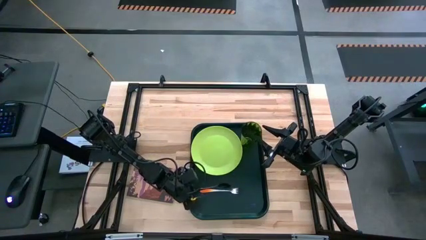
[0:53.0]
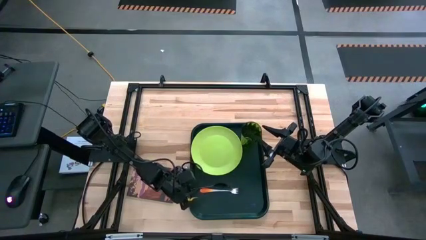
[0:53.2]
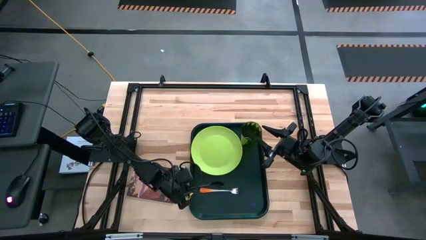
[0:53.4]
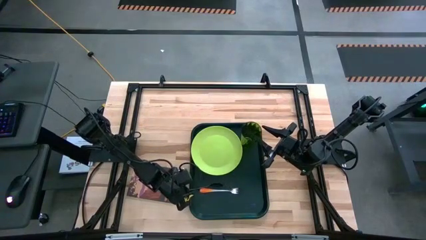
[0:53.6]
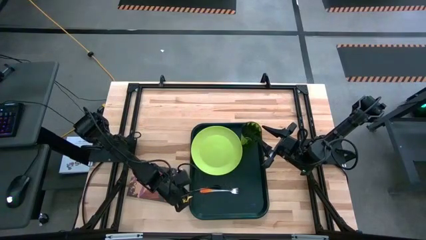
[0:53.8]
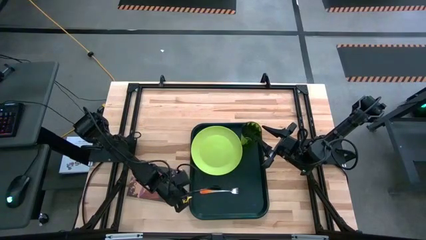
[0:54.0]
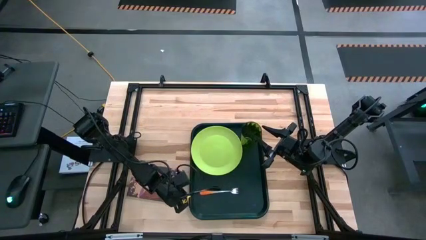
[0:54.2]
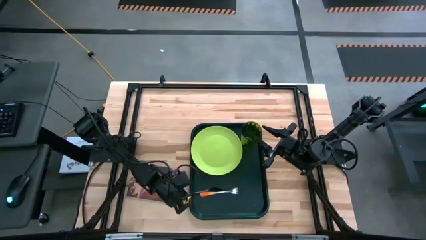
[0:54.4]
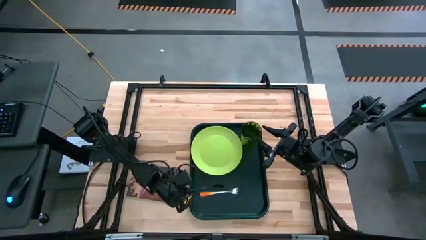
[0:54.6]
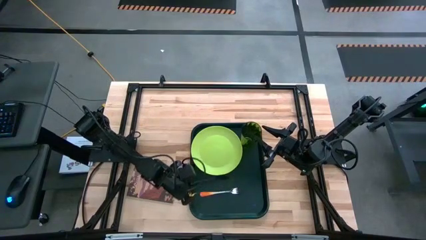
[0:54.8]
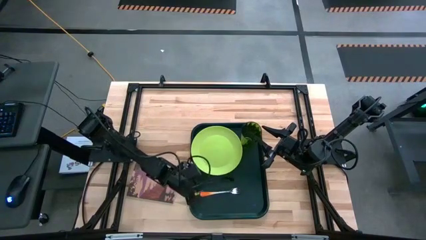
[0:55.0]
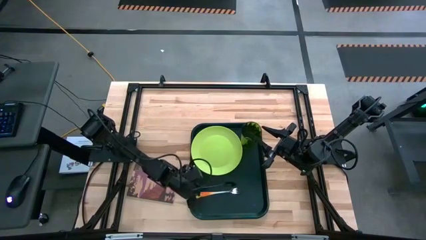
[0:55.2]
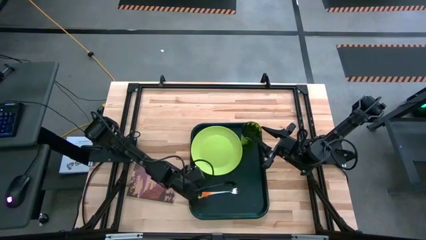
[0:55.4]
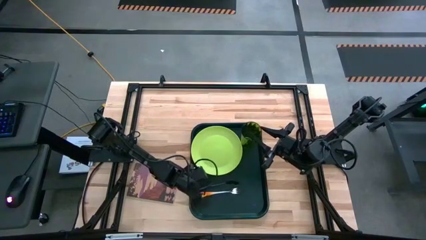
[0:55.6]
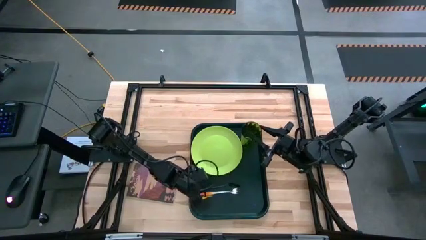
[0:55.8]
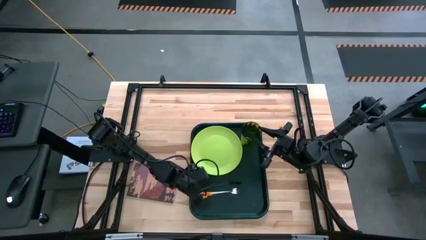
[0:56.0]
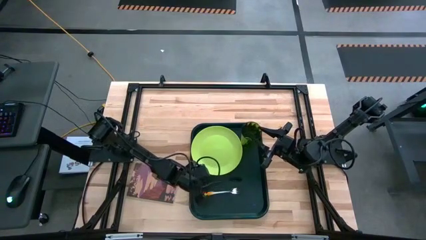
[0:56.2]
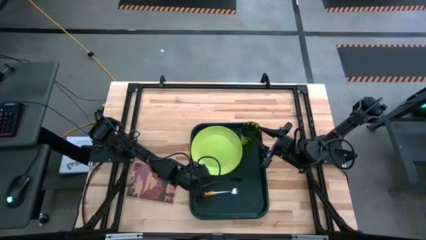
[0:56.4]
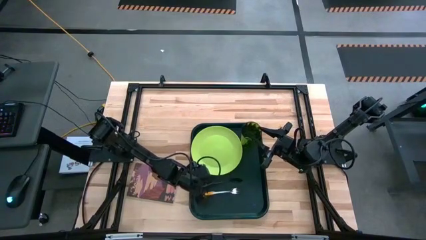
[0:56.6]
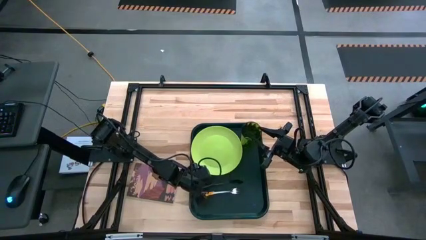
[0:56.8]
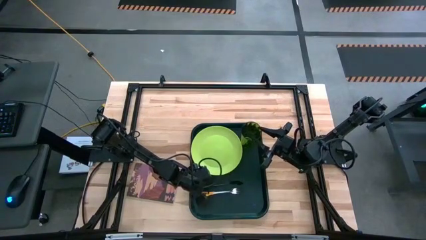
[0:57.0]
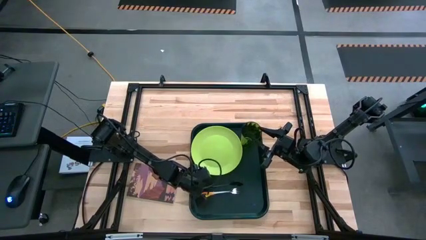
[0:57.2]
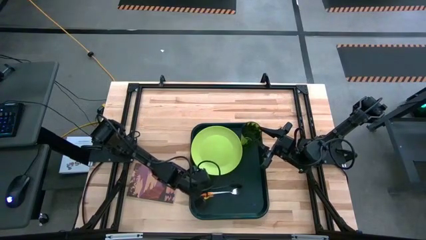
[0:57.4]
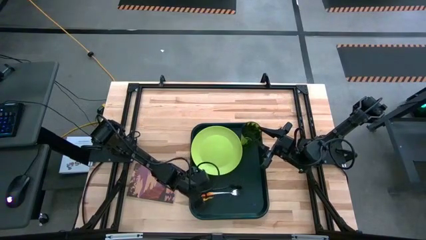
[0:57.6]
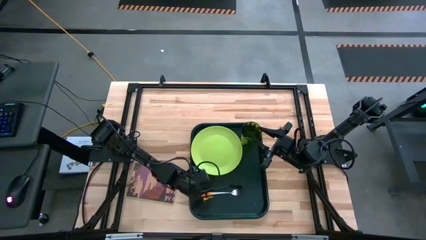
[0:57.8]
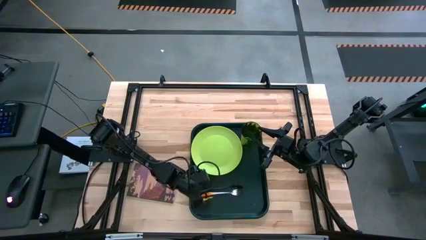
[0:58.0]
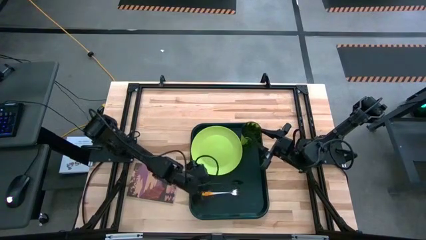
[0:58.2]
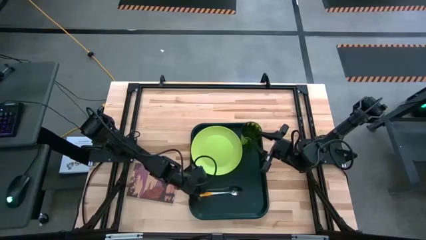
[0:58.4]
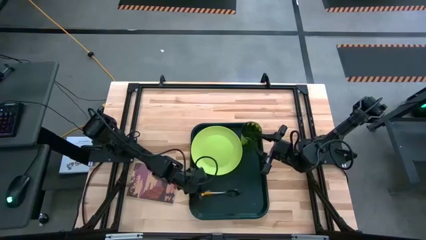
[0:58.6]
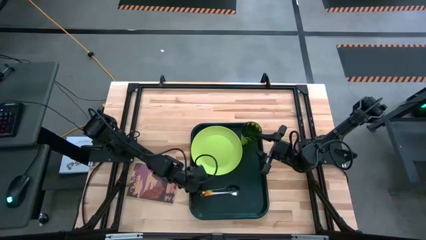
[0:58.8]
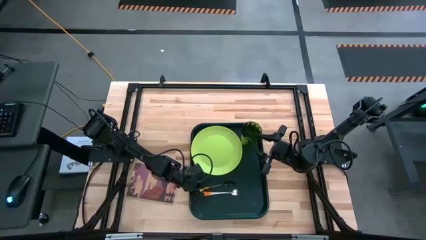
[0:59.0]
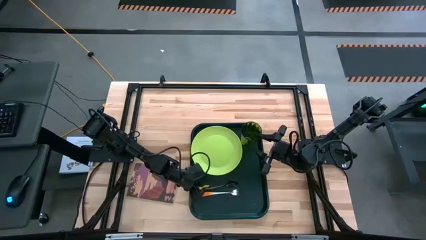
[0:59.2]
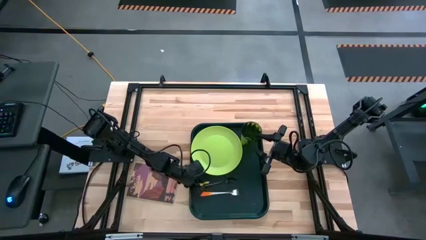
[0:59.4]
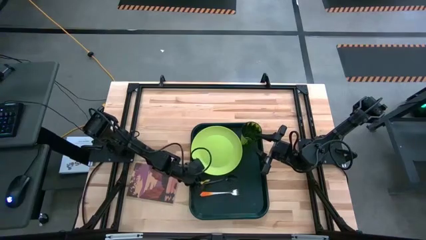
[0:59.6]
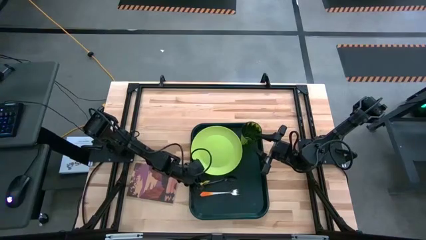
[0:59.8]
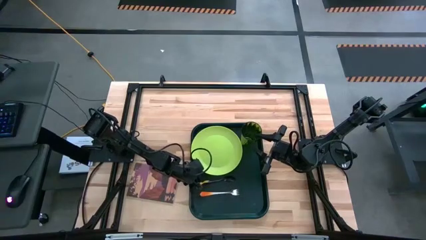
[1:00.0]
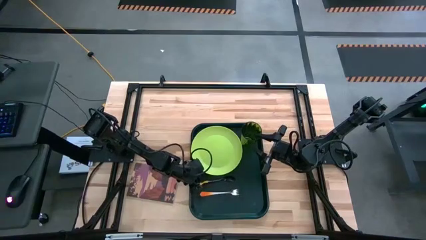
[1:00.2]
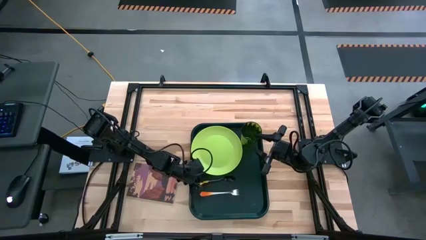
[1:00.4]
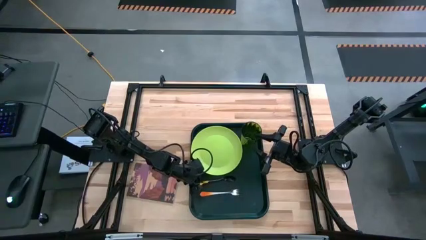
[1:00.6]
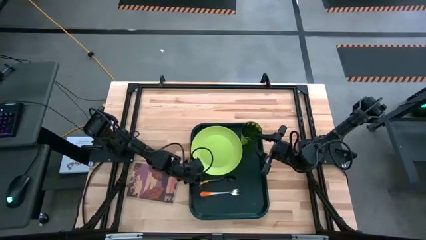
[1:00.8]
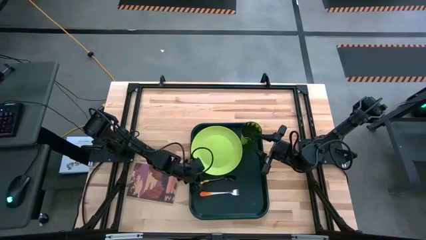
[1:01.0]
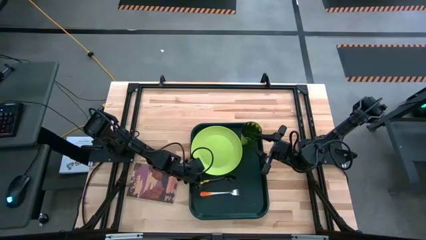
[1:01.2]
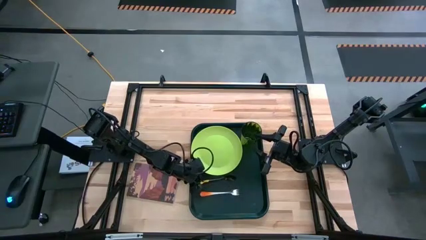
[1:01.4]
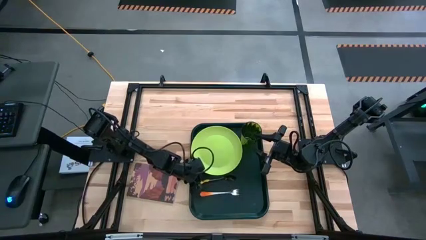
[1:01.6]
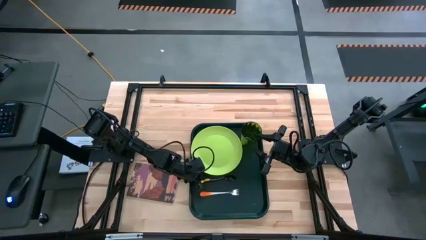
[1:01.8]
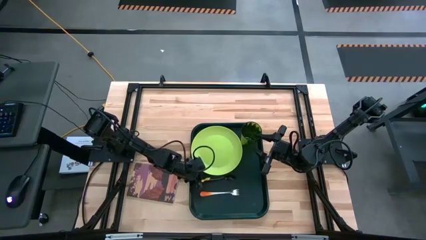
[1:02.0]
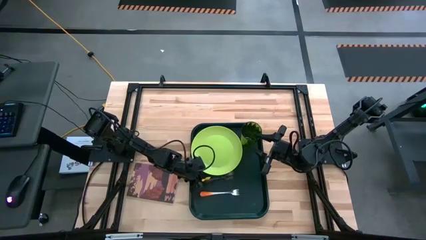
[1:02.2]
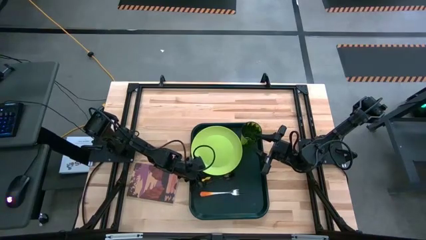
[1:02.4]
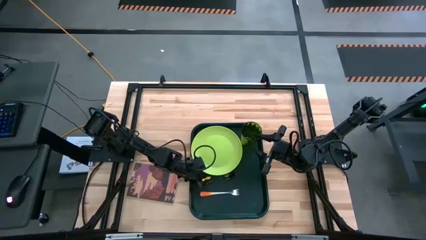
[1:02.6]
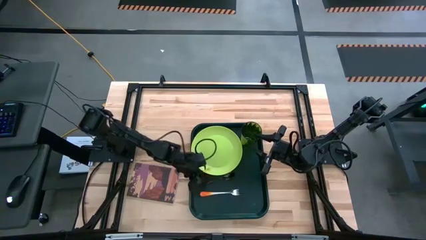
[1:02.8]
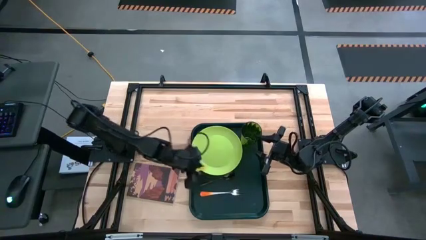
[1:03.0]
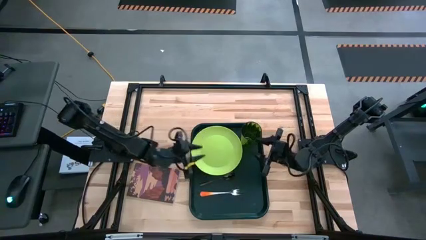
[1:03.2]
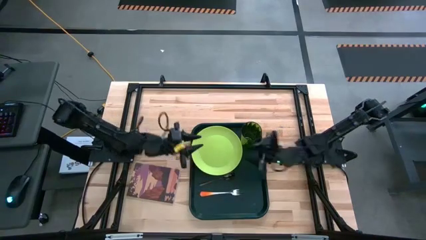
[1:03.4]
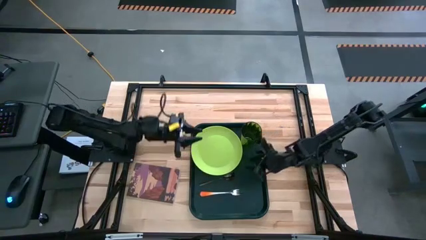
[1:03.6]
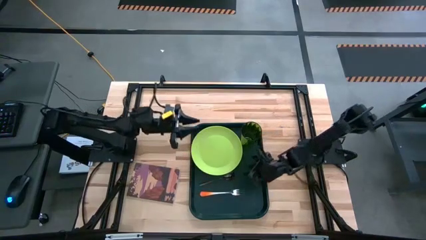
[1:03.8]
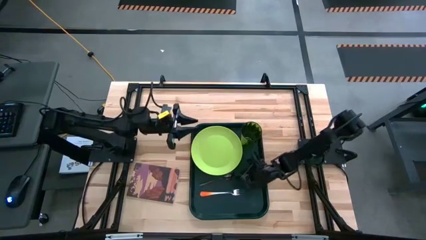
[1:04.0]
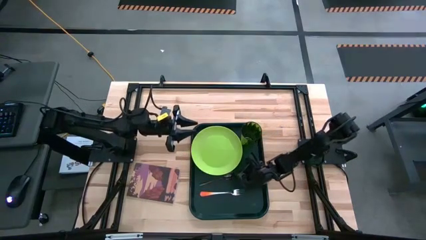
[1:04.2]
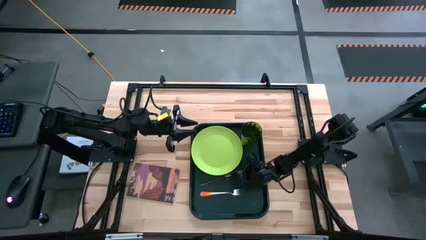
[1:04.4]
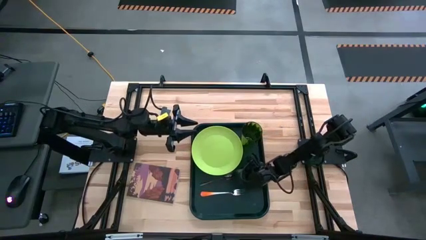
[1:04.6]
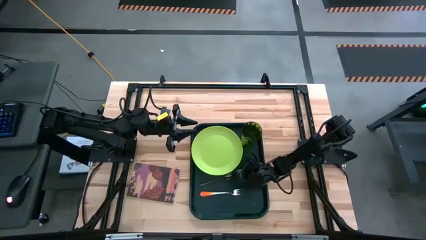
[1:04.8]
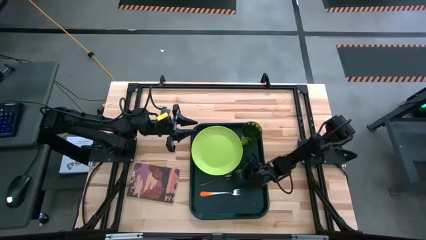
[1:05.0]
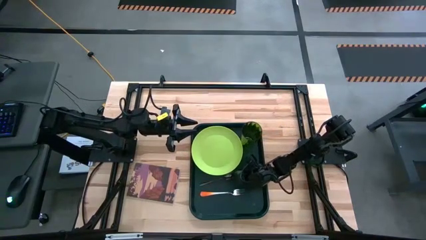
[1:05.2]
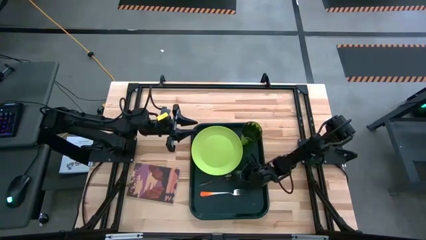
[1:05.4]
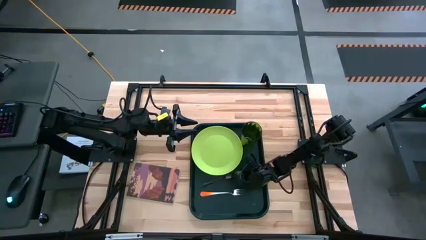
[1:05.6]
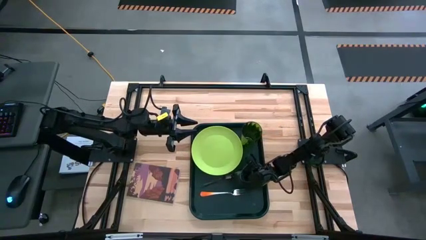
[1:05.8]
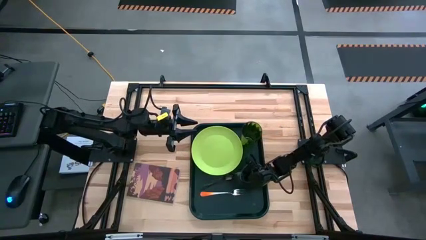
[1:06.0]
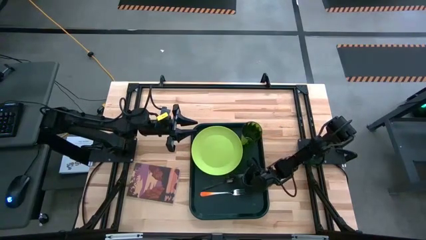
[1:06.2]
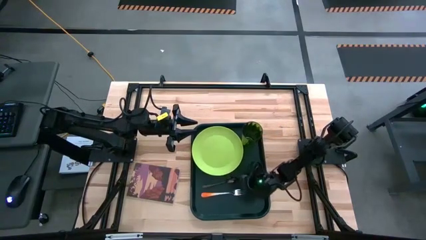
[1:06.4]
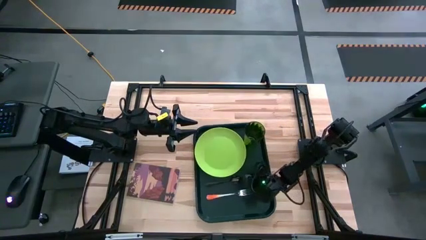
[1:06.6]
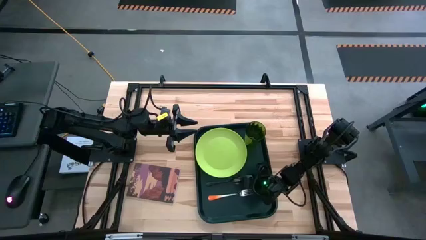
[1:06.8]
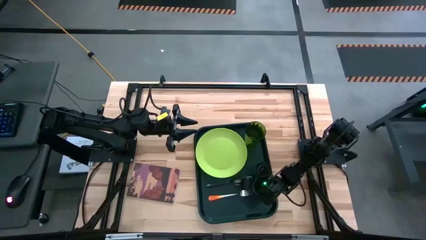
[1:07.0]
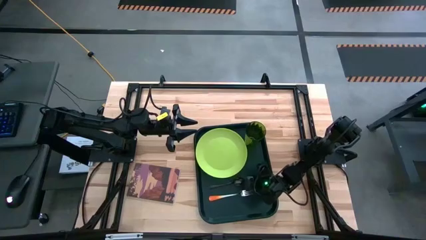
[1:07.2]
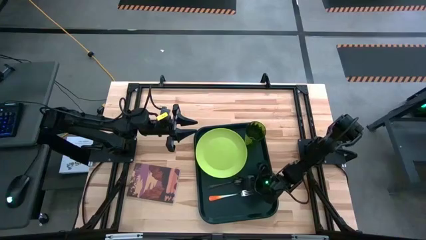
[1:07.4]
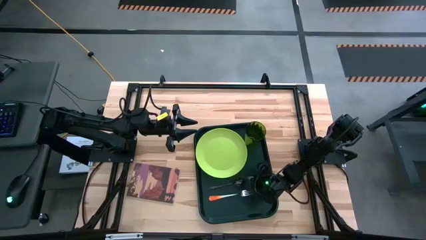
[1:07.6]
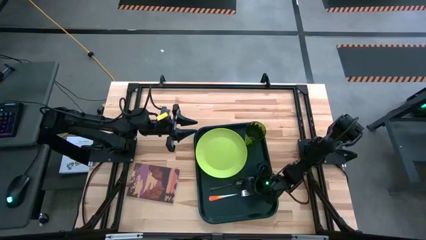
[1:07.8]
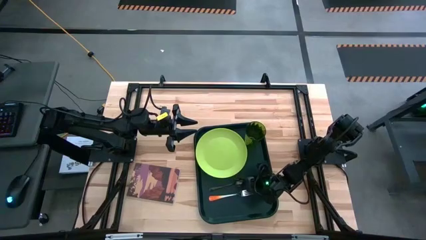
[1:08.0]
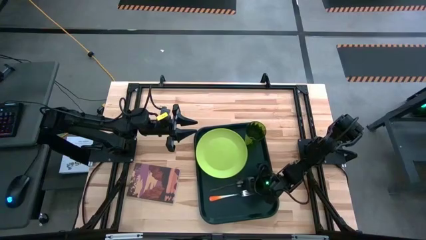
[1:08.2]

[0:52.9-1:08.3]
Task: Pick and place plate/cup/fork/spoon on tray
Put the black spoon on the black serving tray in between the green plate and orange fork
